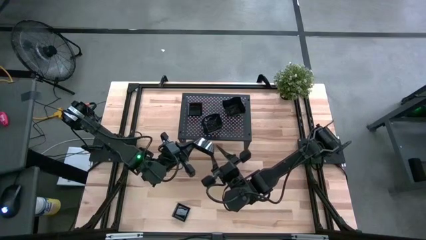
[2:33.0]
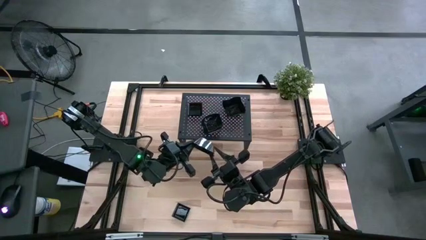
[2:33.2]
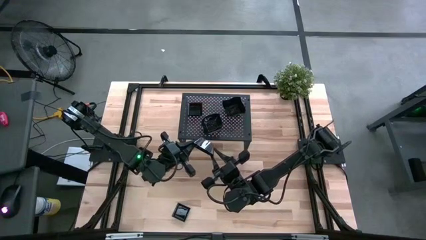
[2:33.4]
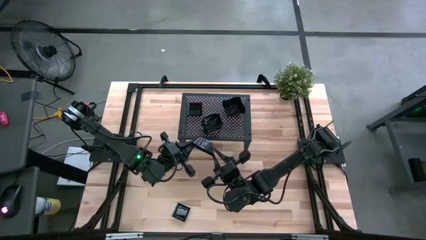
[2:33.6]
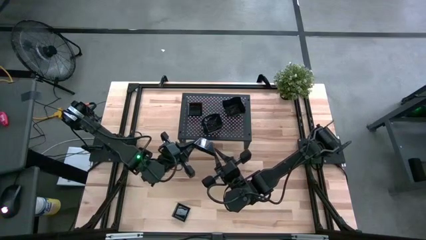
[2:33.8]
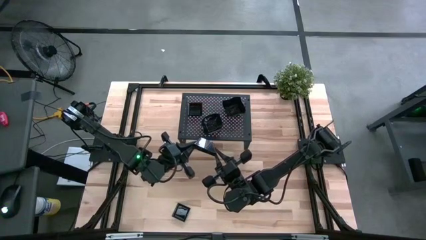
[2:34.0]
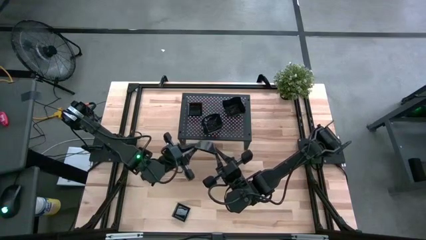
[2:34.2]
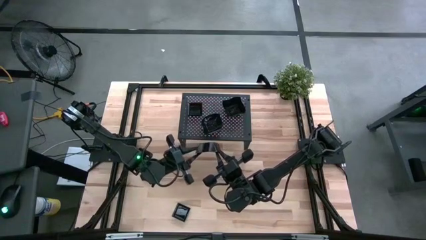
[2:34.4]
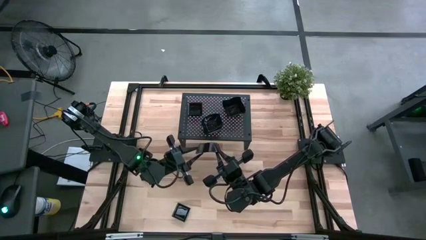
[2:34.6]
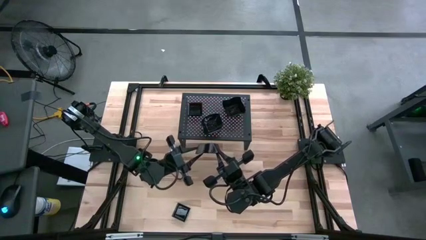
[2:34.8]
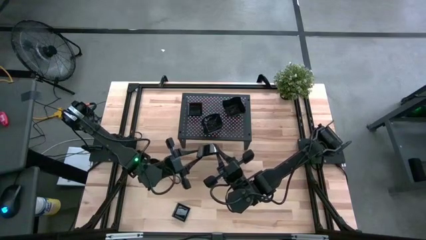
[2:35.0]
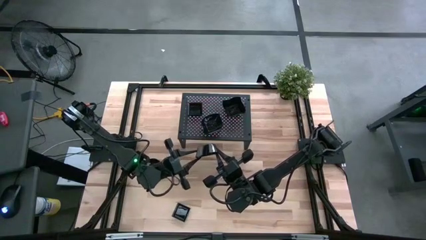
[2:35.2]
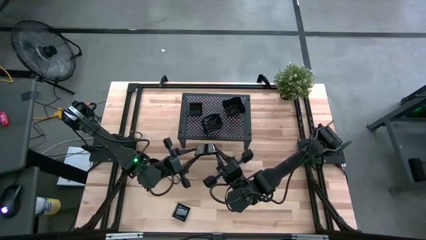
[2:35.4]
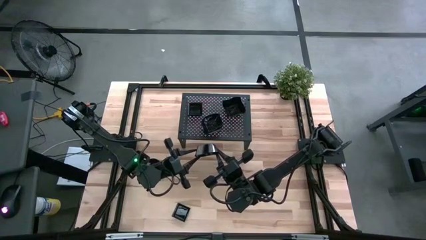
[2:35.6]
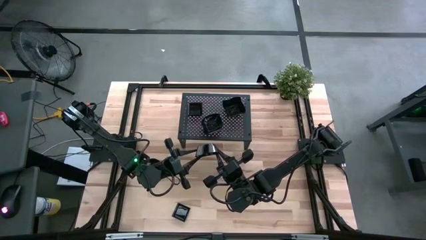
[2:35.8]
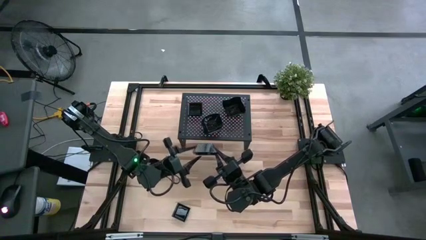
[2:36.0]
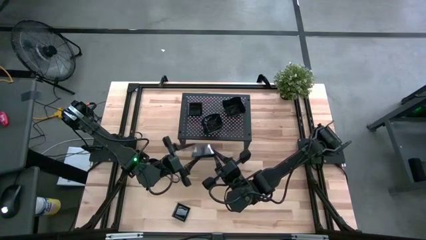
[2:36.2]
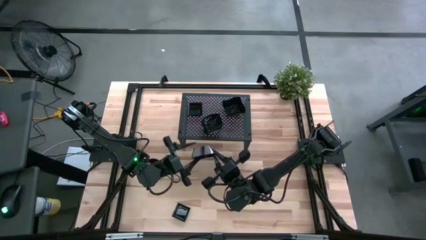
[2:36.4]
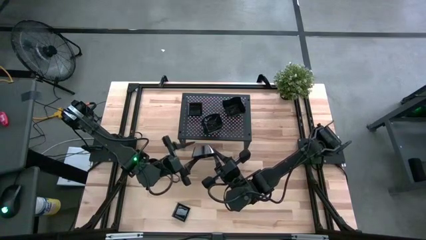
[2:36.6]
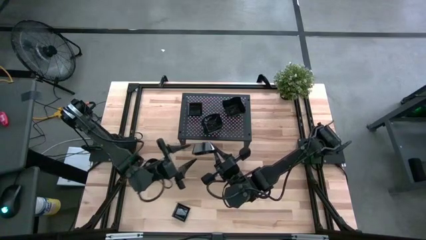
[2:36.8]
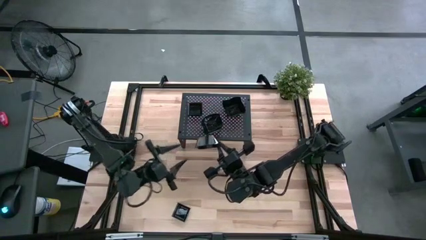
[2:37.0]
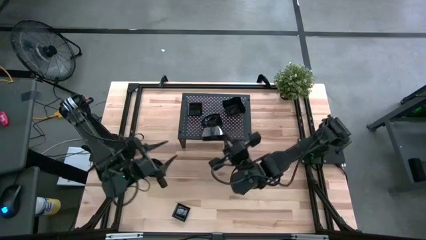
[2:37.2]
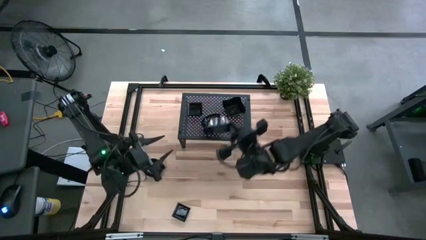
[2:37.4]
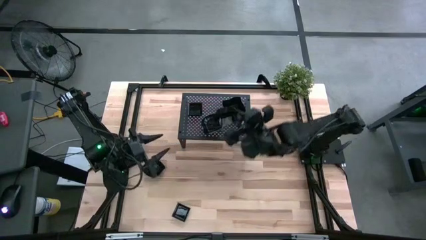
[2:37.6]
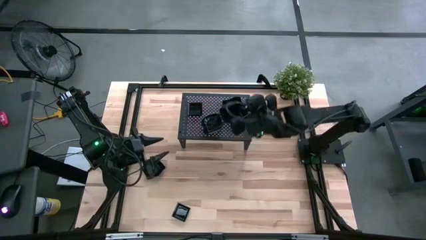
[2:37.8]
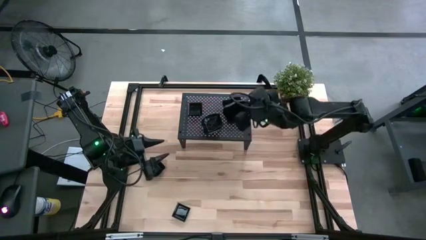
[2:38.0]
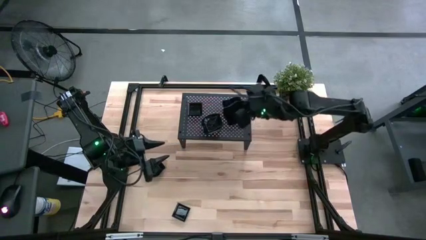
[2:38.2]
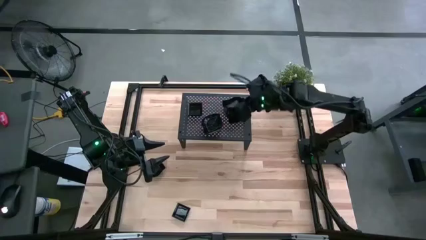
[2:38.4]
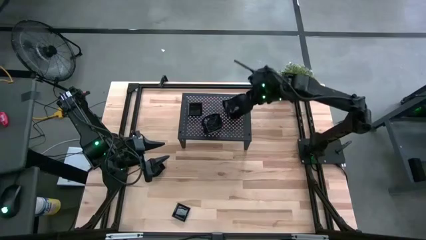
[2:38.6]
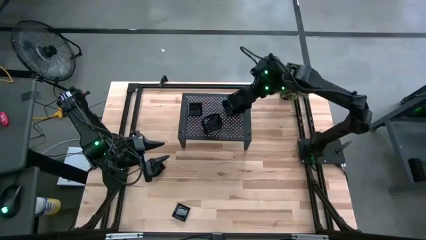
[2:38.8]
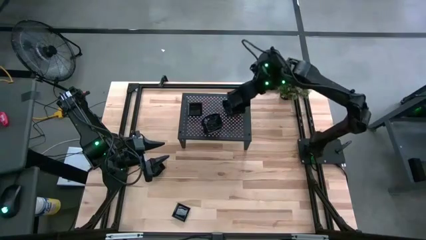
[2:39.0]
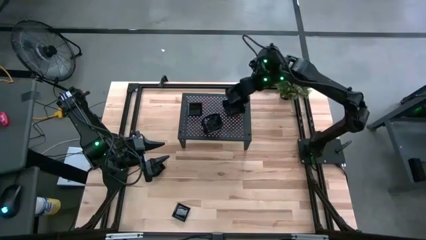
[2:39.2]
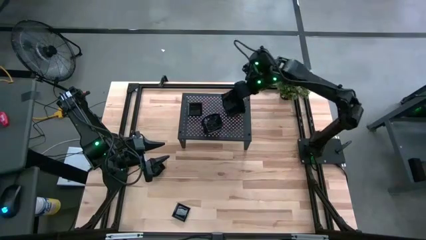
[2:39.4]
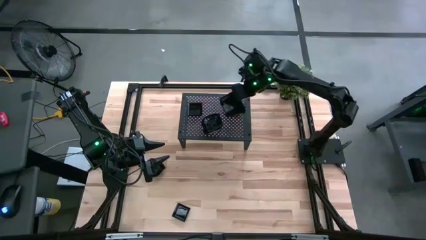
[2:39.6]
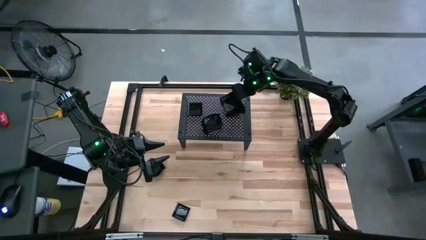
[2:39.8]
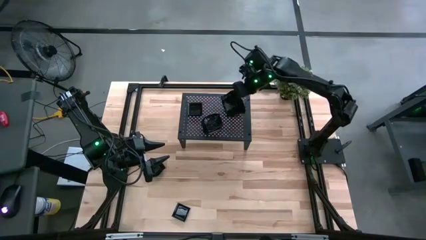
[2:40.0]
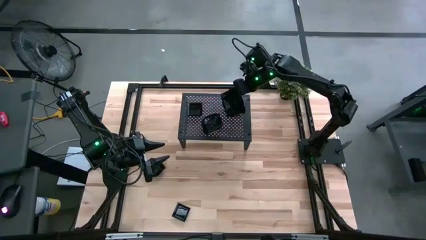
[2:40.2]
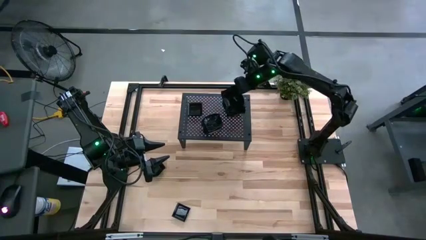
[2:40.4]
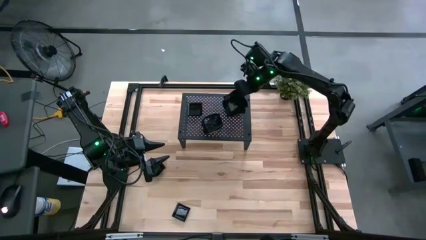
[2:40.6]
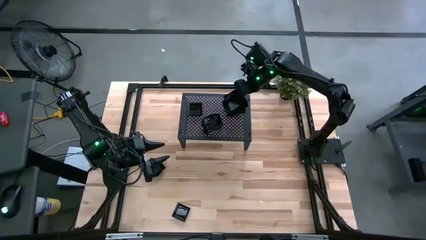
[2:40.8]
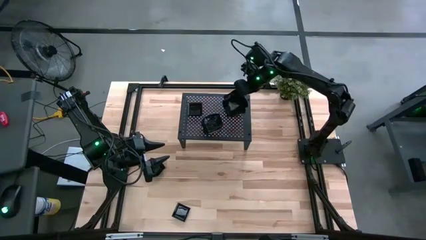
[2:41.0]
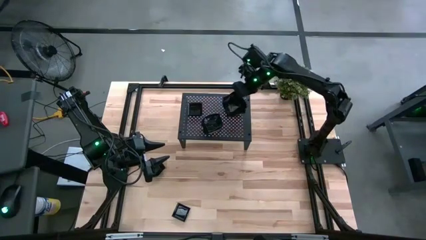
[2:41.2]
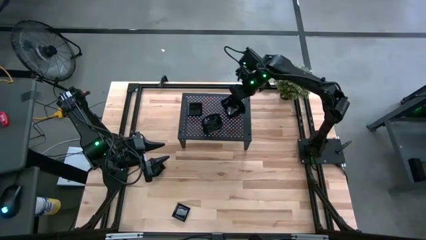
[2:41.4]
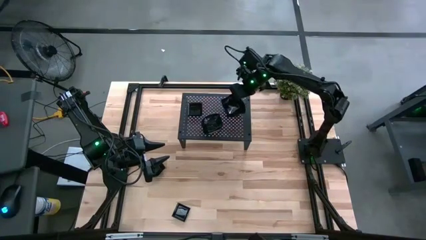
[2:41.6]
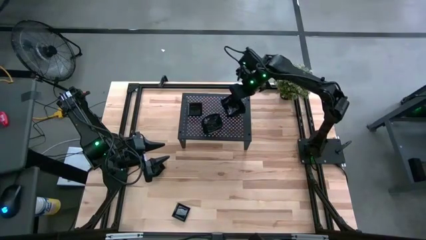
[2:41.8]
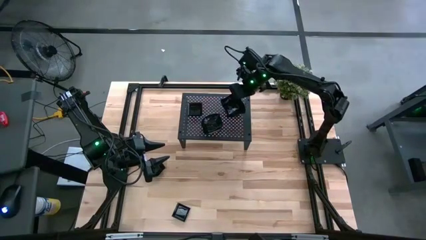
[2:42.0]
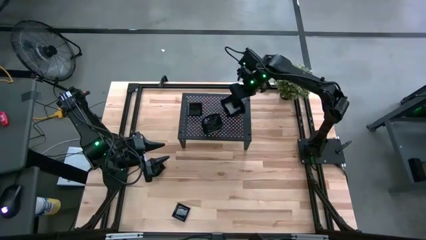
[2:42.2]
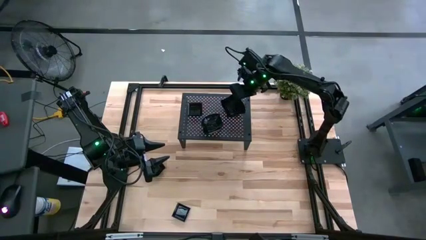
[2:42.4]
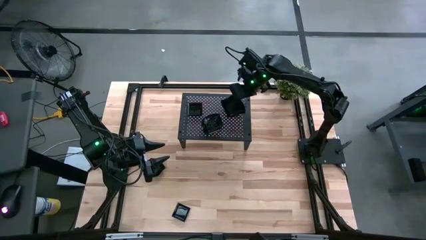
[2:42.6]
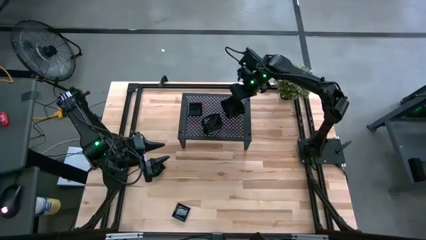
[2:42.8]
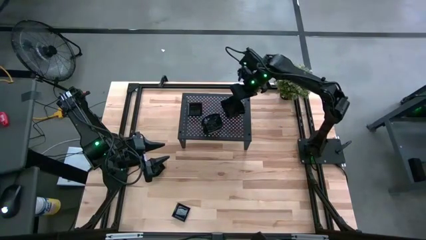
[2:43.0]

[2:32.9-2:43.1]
Task: Pick & Place Mini shaped plates
Stack the black distorted plate on top of the black distorted plates on the shelf
